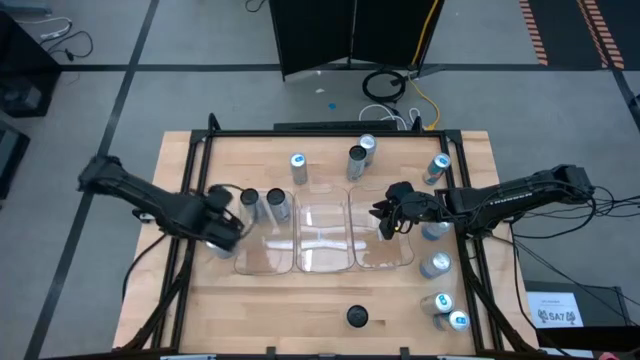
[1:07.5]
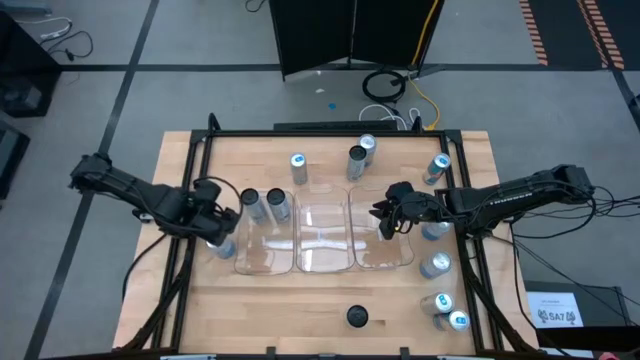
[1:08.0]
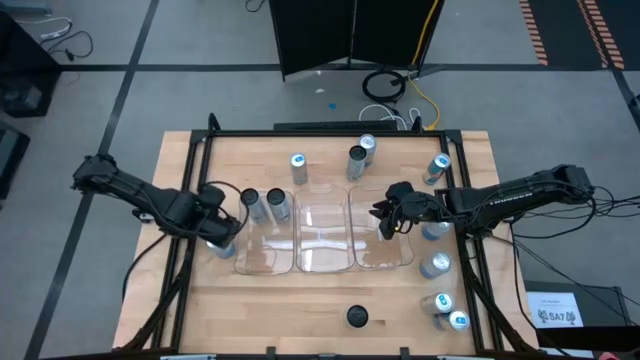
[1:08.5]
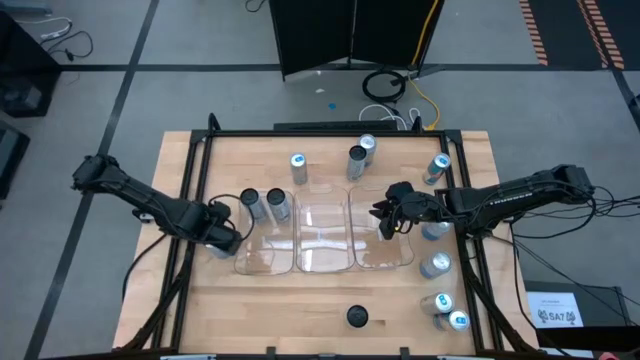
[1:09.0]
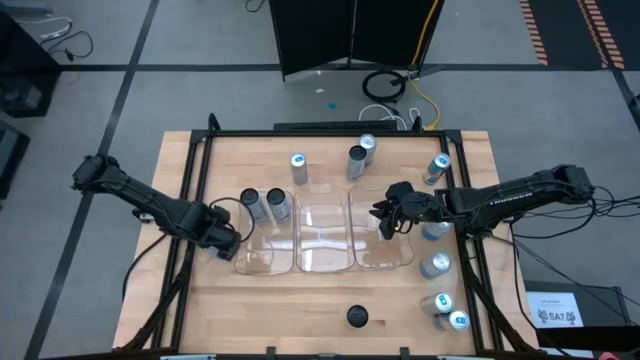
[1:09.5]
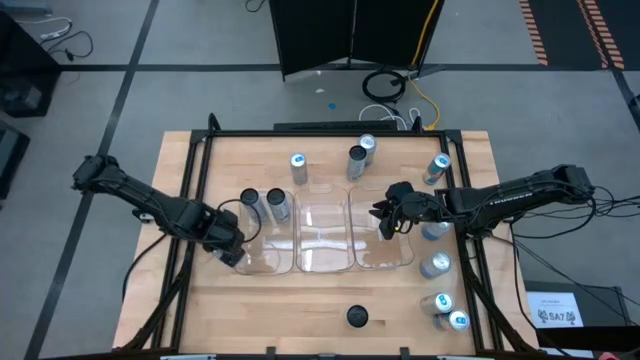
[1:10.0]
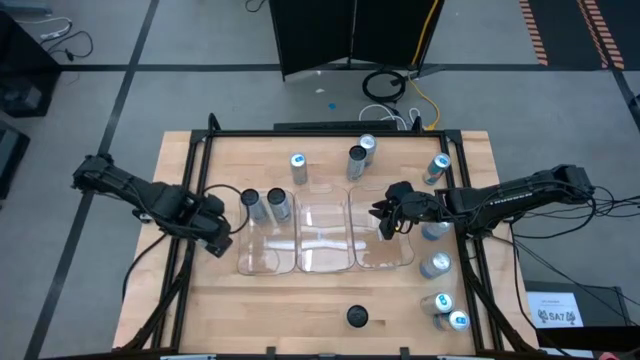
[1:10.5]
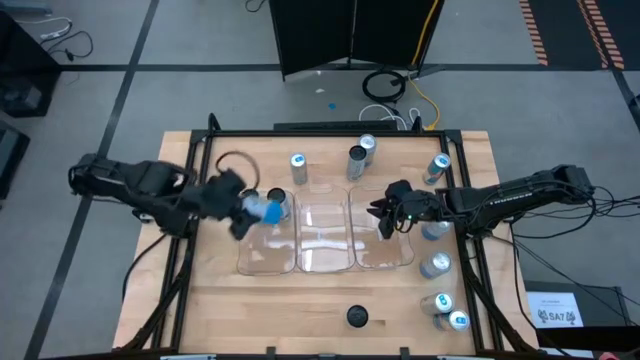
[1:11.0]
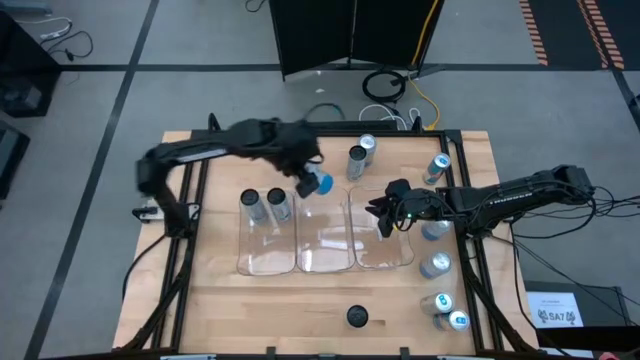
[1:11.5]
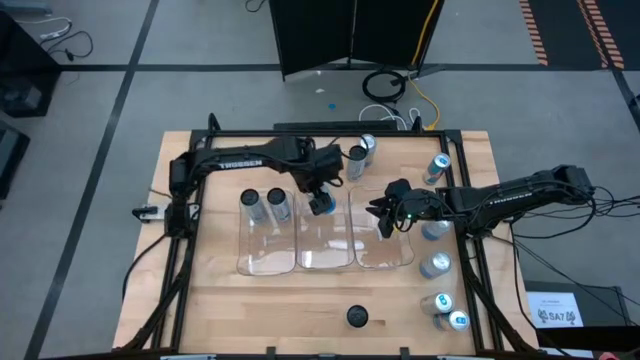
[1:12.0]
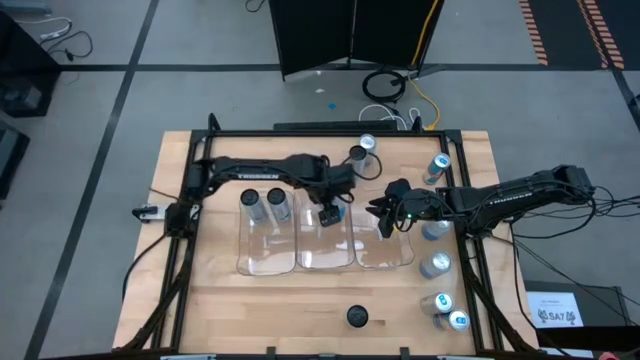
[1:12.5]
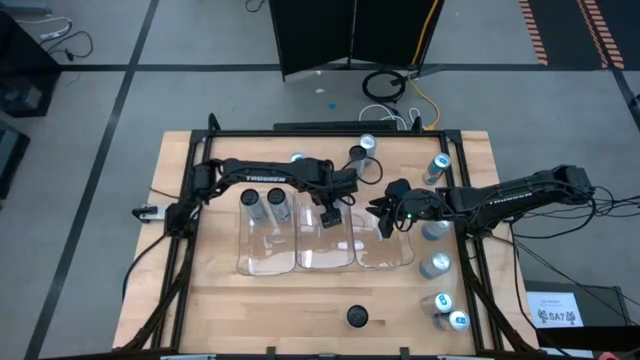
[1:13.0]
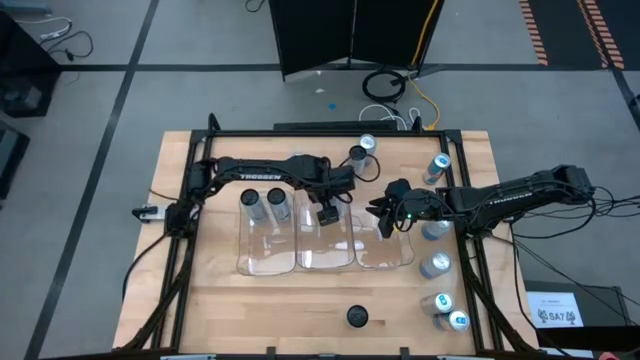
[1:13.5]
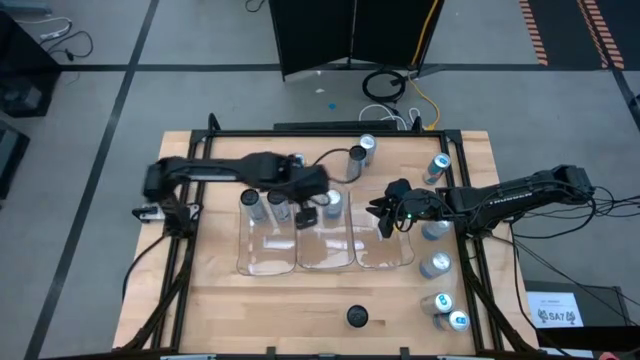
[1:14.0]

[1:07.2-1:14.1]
Task: Sort soda cans
Put the middle left blue soda can into the middle transparent bin

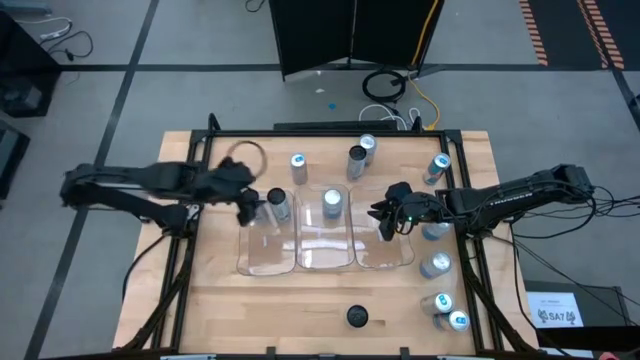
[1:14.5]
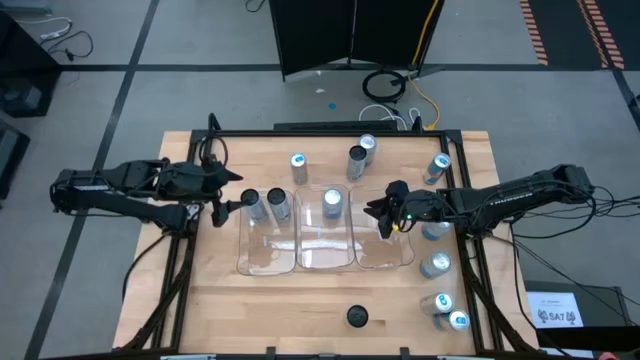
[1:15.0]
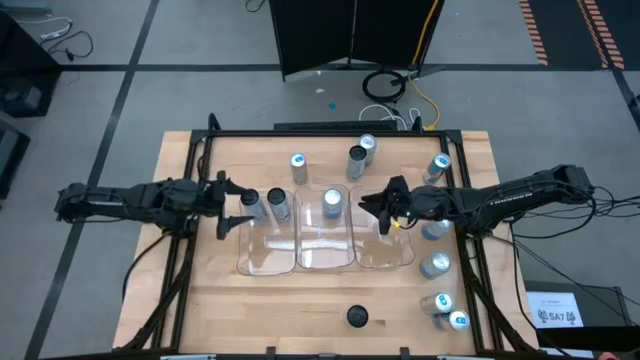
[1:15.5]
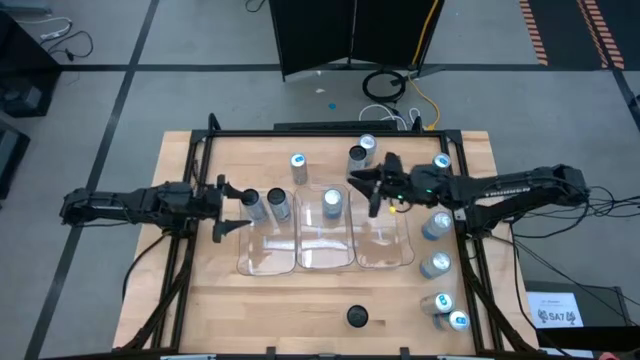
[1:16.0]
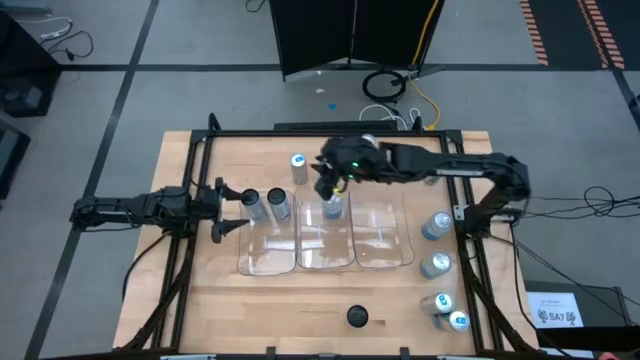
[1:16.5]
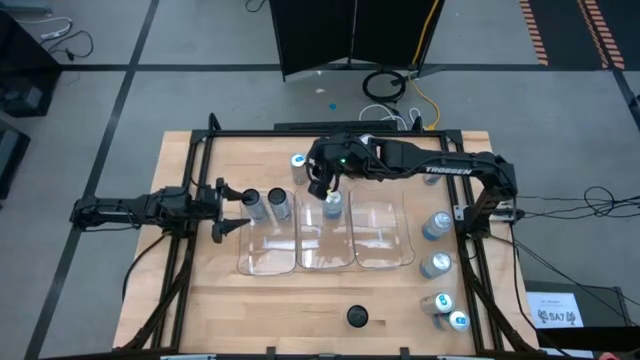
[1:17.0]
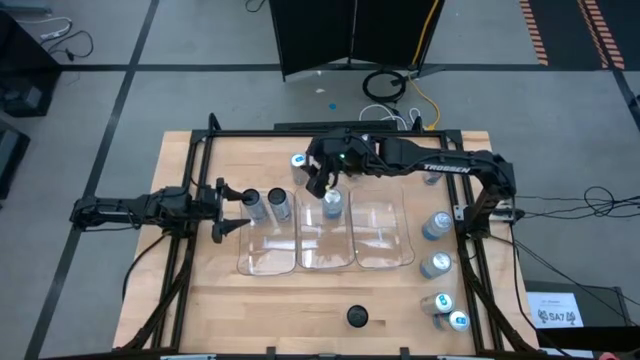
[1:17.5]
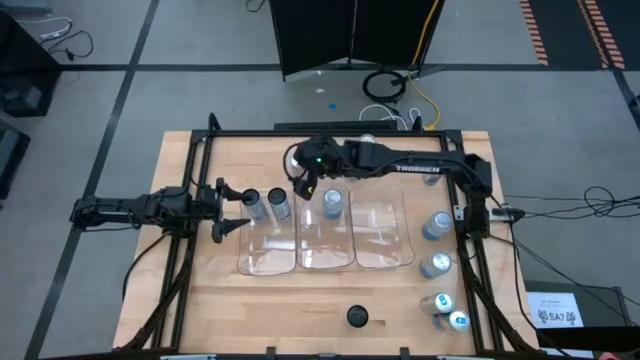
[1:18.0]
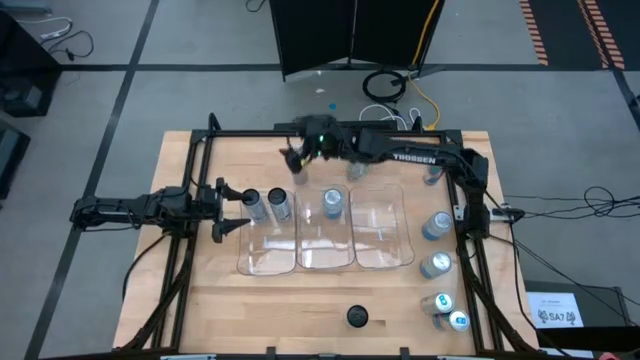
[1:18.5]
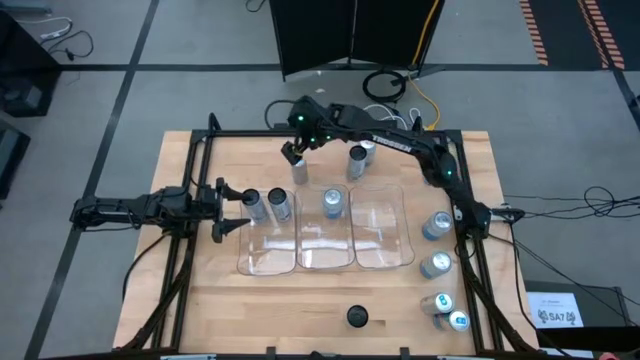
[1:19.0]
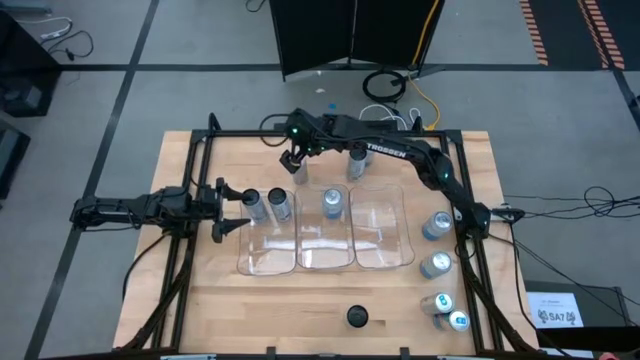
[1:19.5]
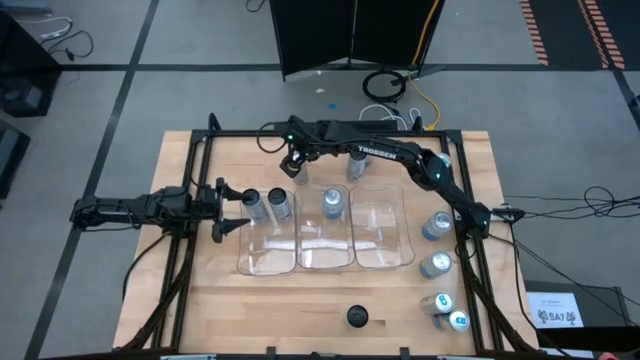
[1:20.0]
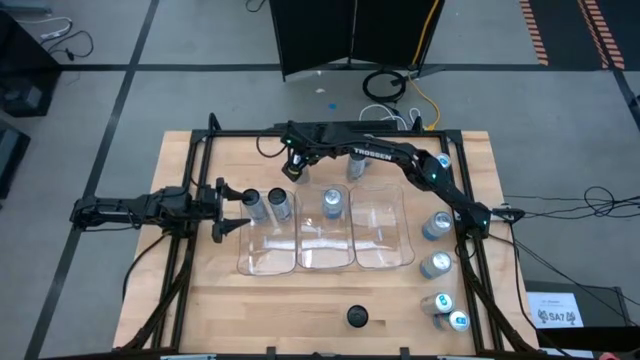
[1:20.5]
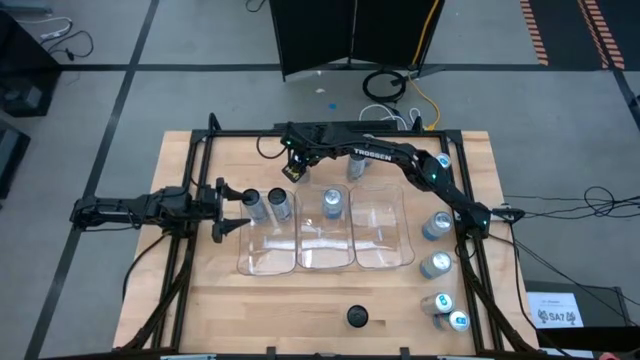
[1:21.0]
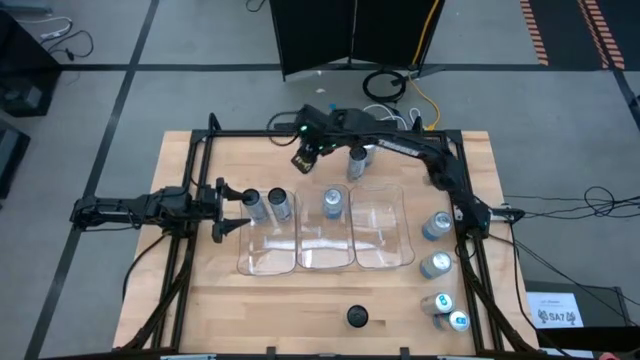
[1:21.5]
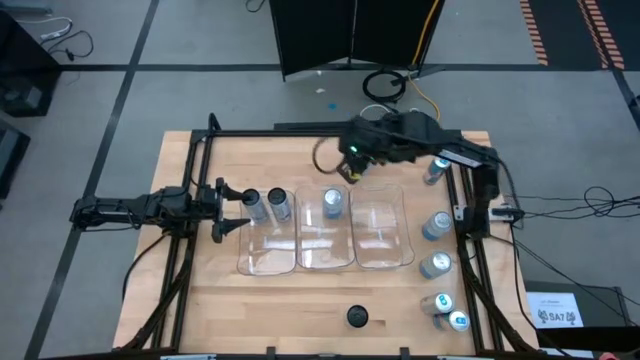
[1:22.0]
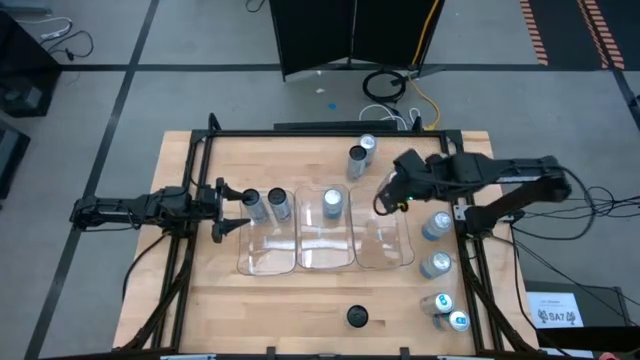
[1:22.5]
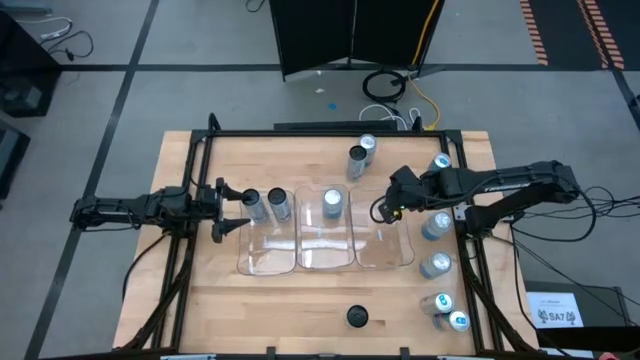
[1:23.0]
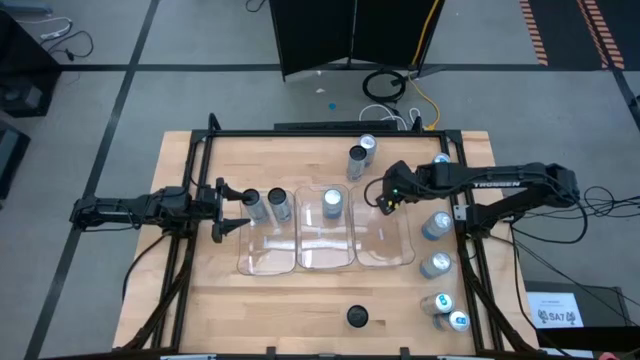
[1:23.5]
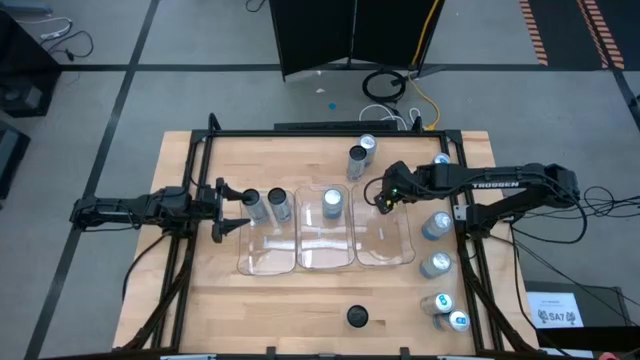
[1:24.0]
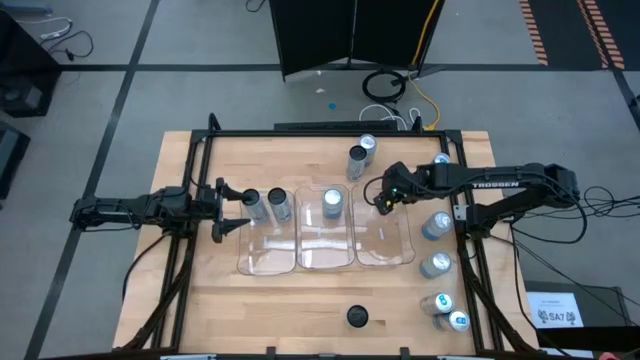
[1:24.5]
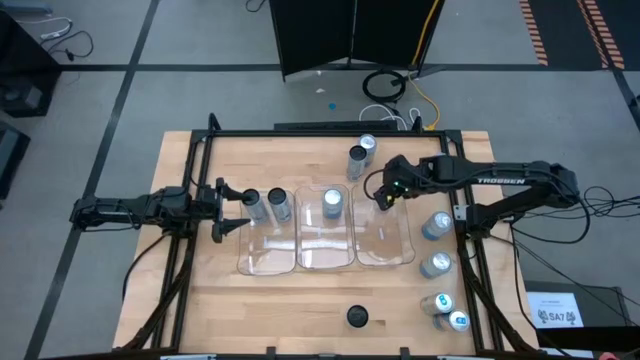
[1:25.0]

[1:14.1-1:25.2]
Put the top left silver soda can into the right transparent bin

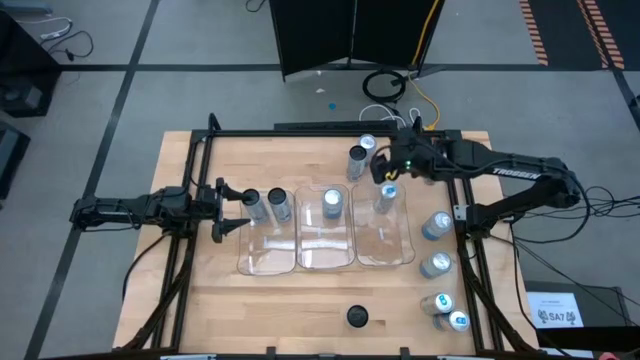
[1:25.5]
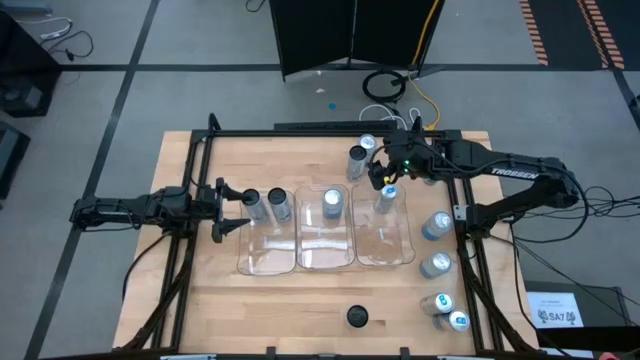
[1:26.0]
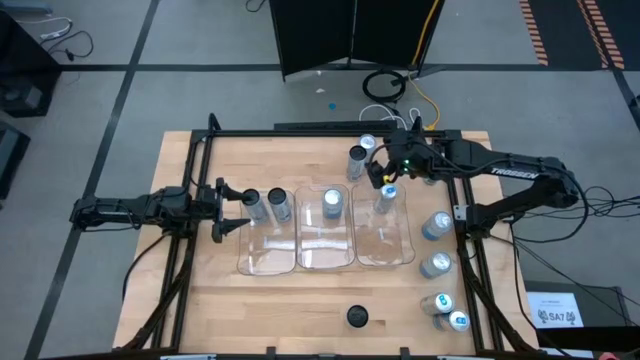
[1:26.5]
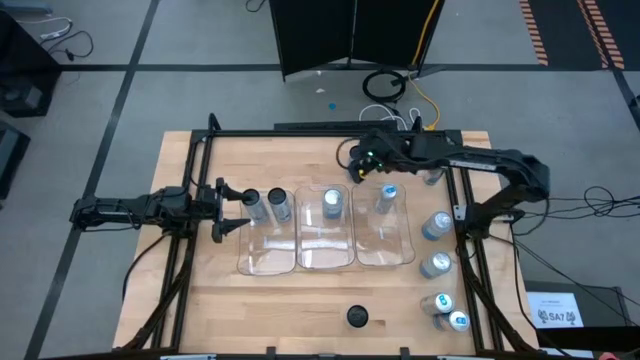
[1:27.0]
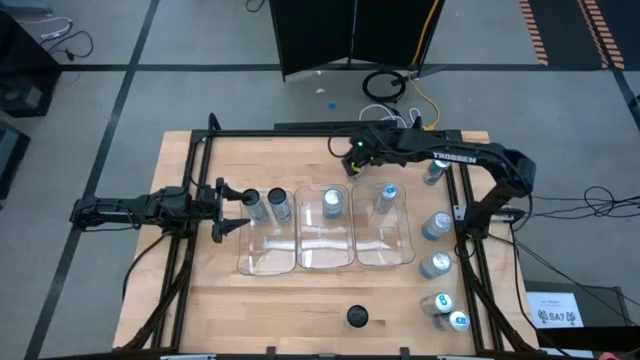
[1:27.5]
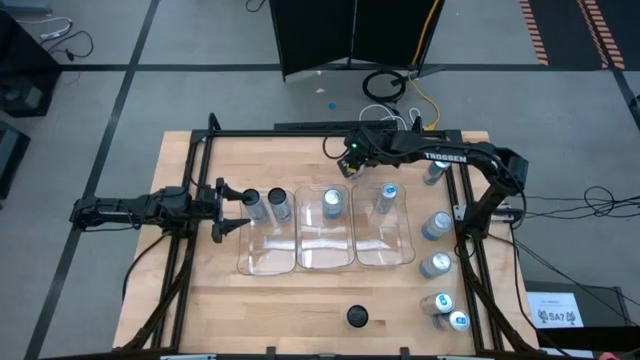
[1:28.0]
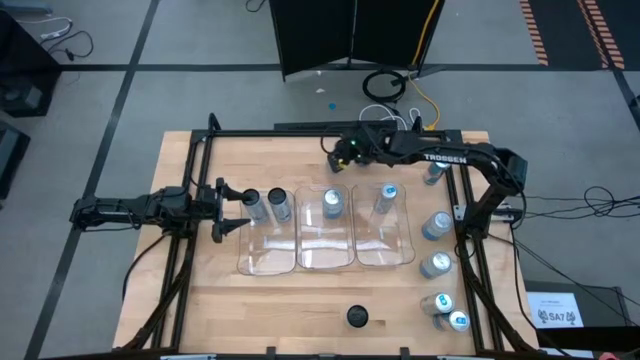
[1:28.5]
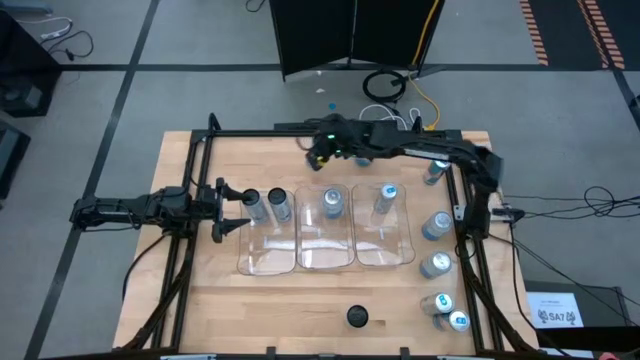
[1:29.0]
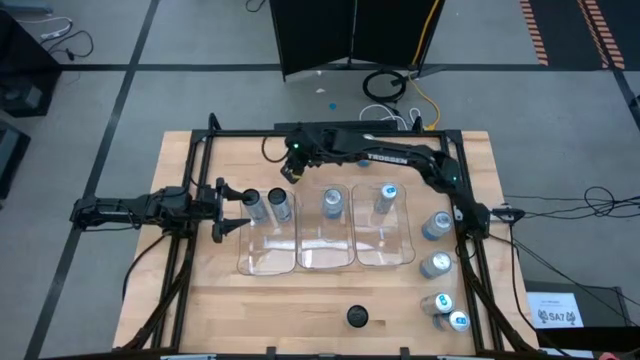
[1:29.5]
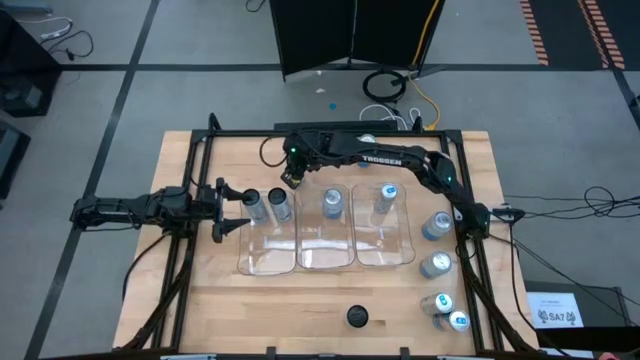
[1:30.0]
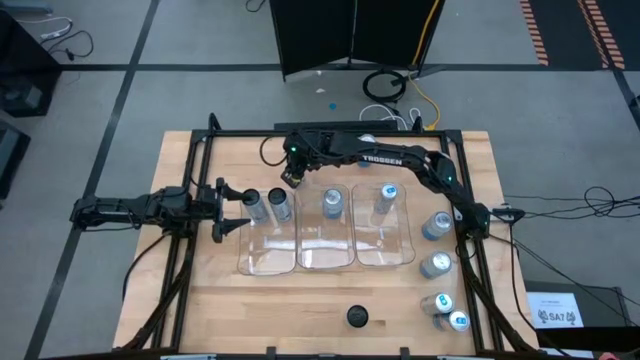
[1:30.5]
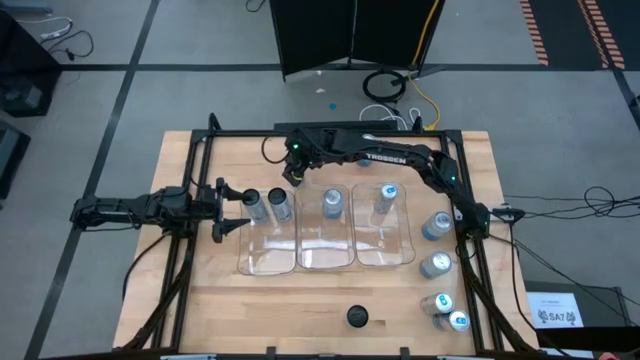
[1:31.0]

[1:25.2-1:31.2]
Move the top white soda can to the top middle of the table
